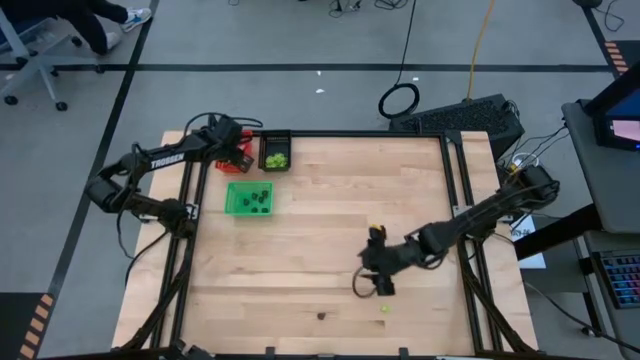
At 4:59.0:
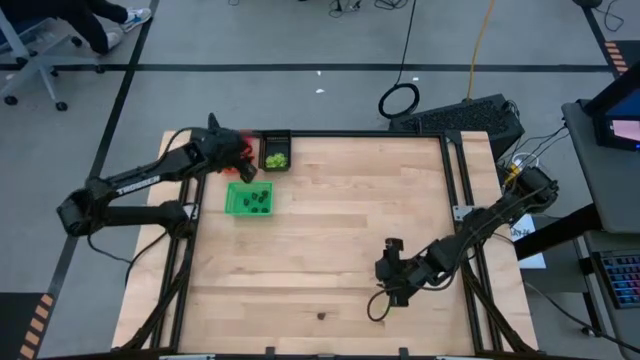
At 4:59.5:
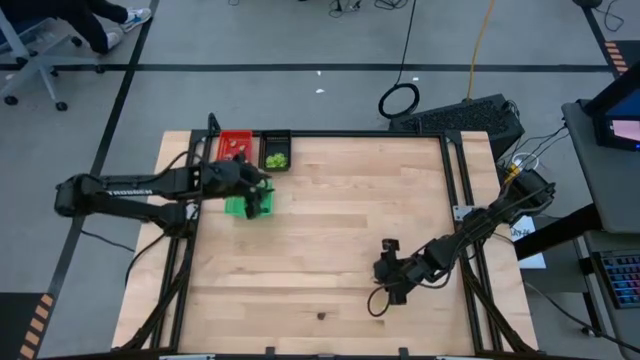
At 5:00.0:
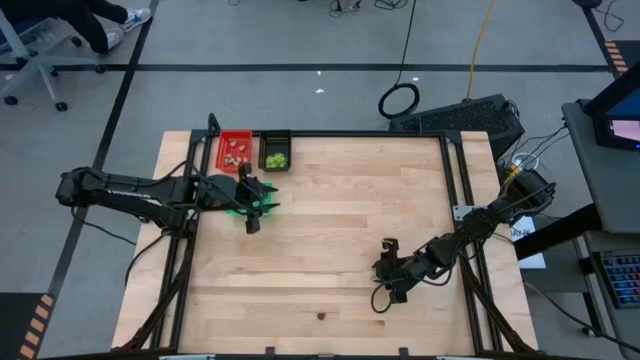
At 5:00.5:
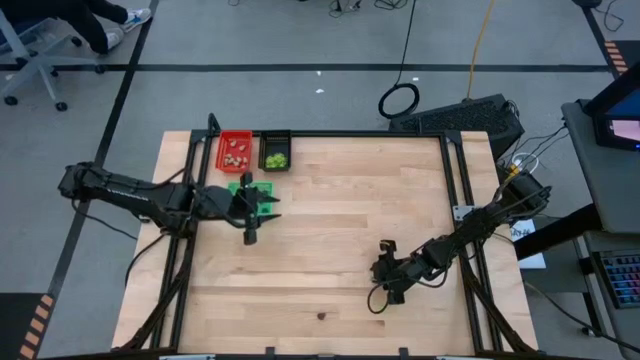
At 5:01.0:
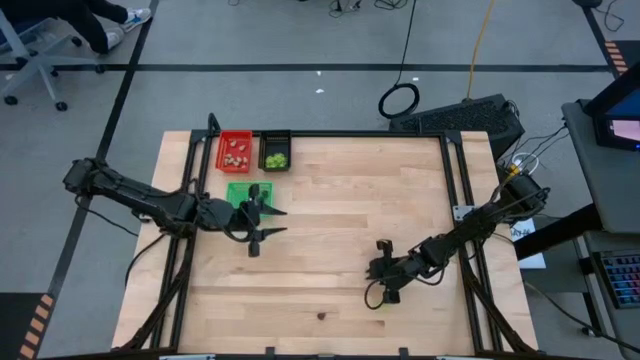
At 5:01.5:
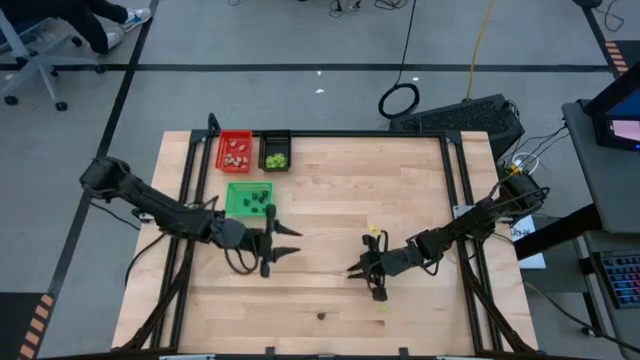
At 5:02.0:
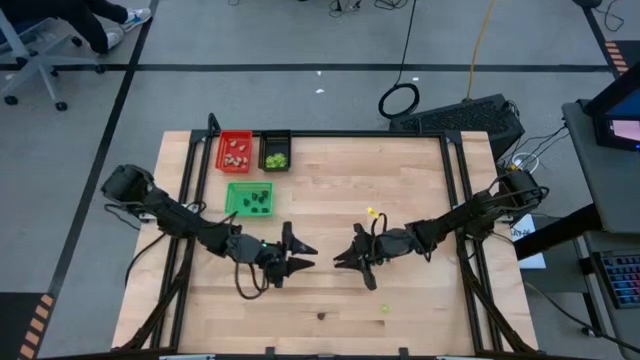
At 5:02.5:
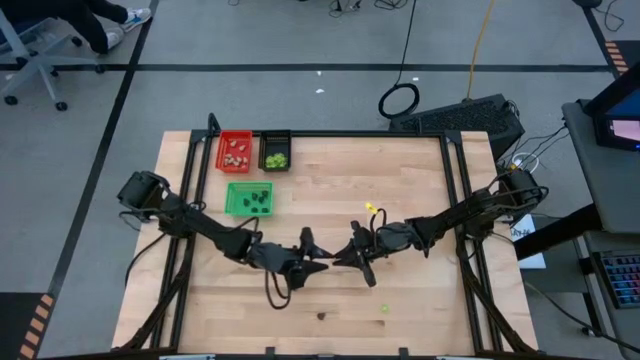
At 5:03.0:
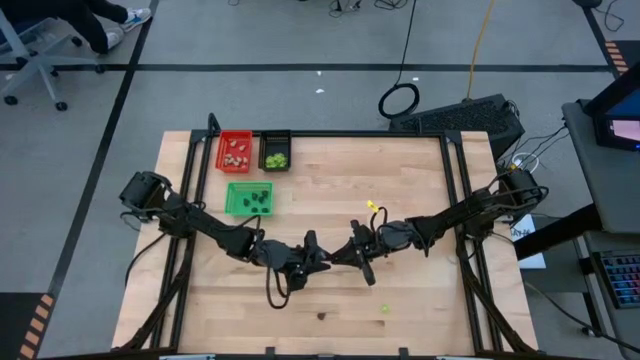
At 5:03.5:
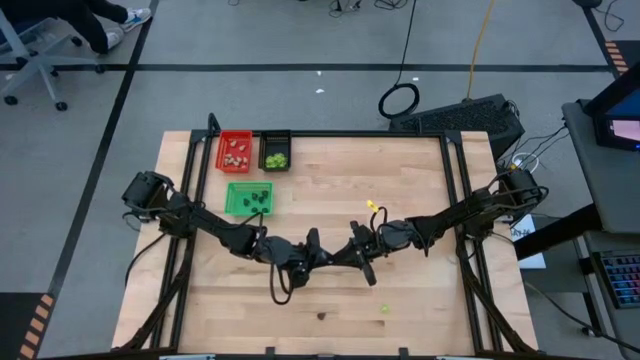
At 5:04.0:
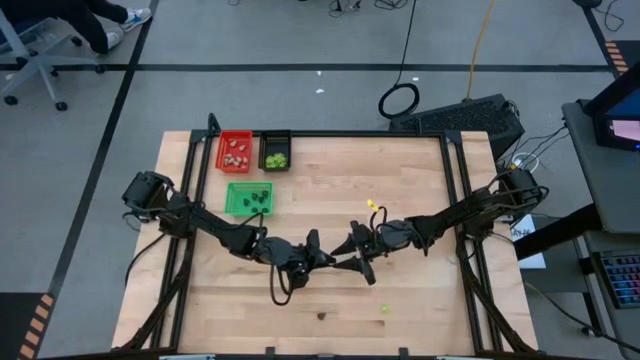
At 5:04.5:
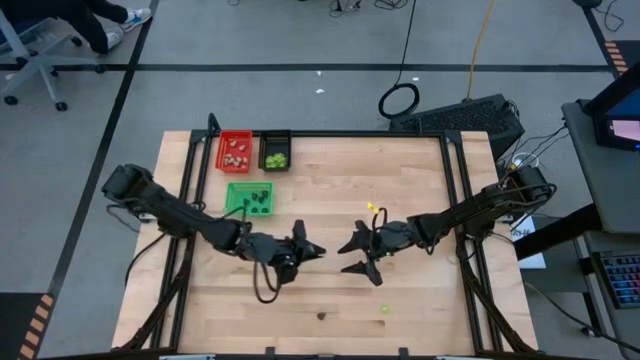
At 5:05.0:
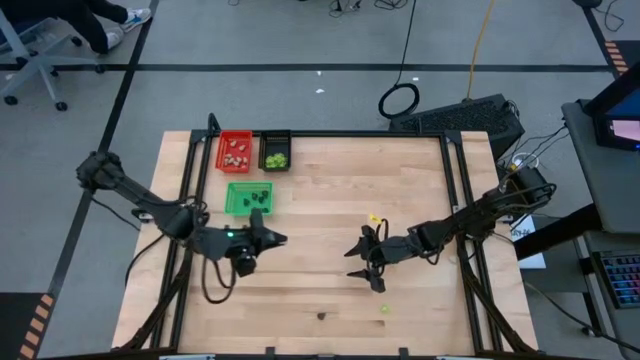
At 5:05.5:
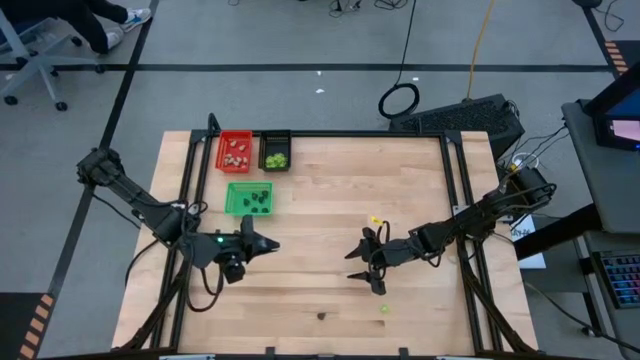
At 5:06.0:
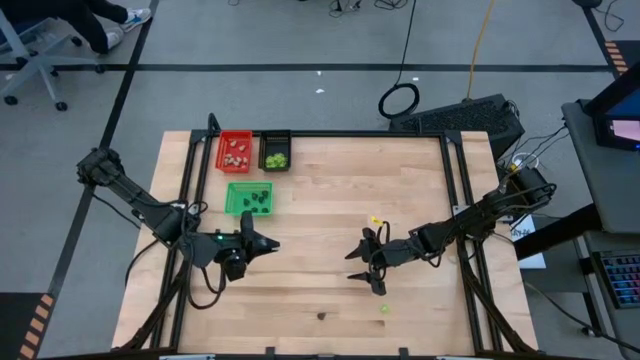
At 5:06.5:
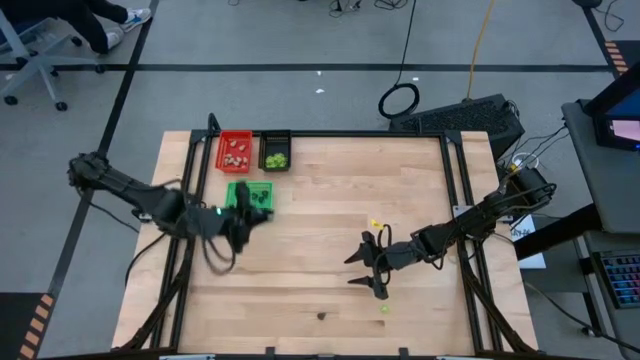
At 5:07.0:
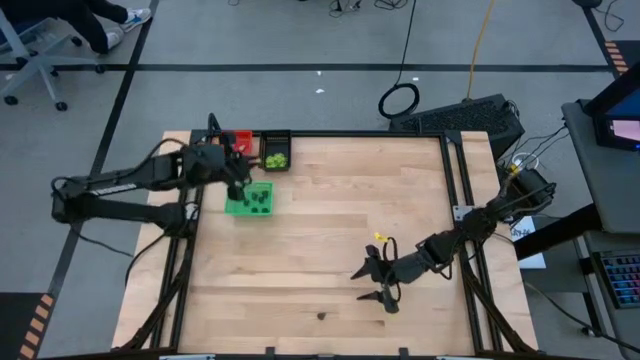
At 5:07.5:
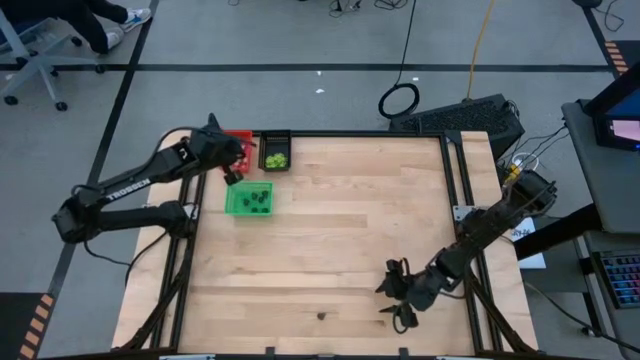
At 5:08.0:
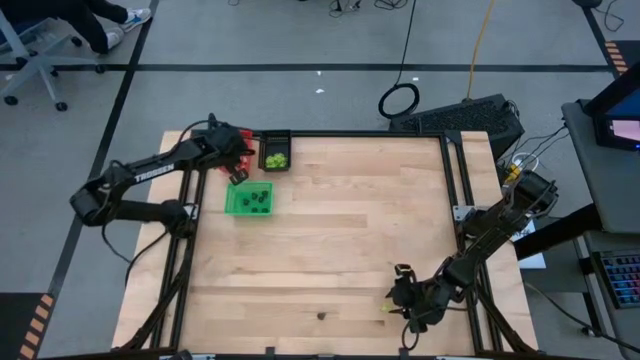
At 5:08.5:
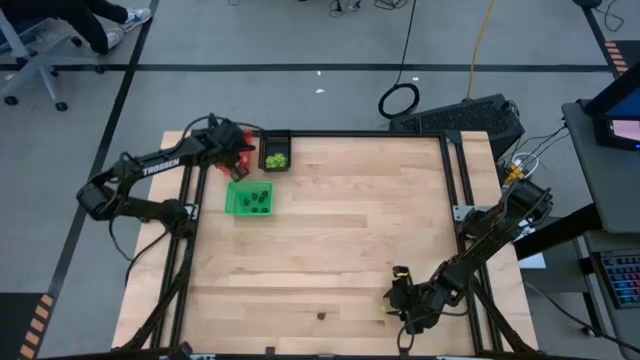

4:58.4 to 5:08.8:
Task: Sort Halloween decoration
Put the white skull toy into the red bin

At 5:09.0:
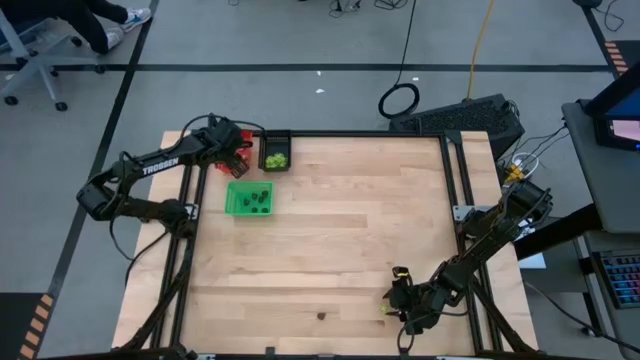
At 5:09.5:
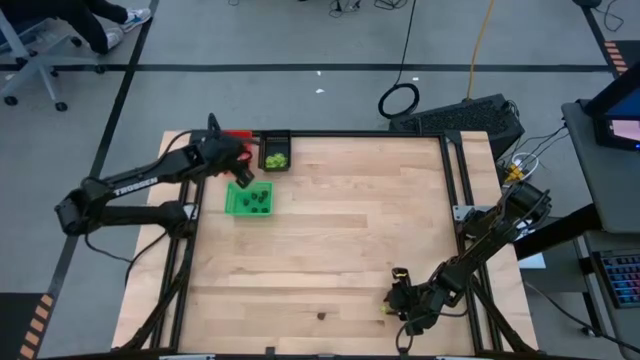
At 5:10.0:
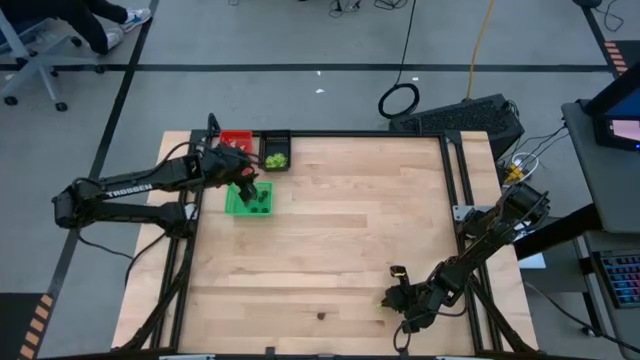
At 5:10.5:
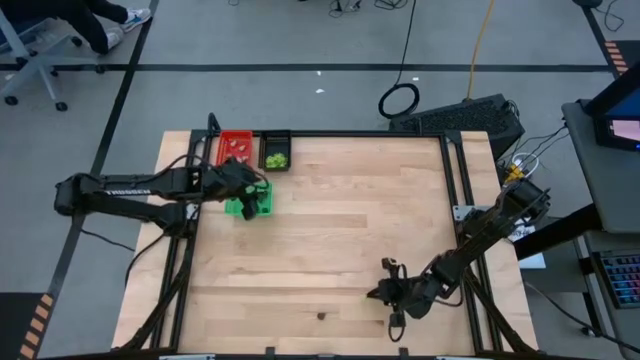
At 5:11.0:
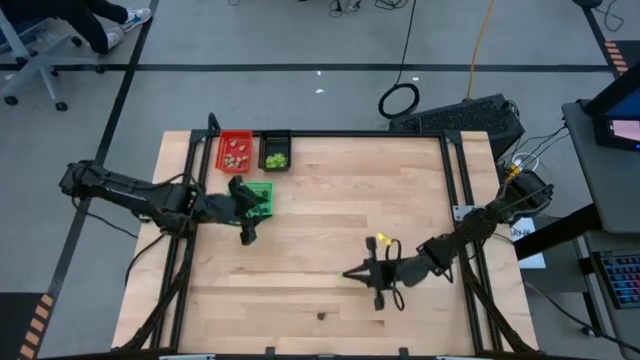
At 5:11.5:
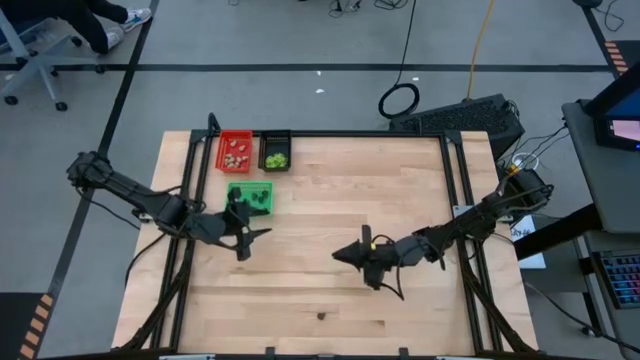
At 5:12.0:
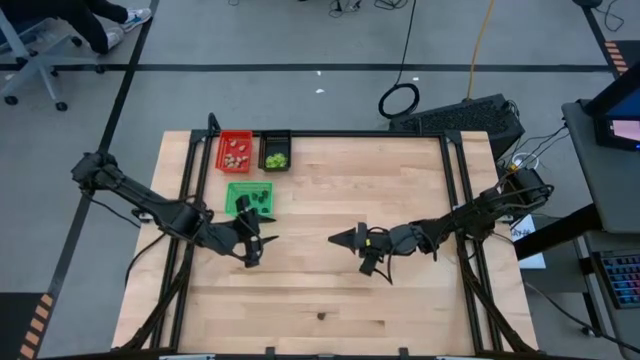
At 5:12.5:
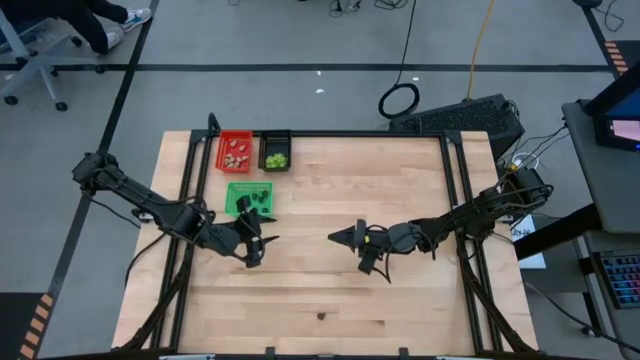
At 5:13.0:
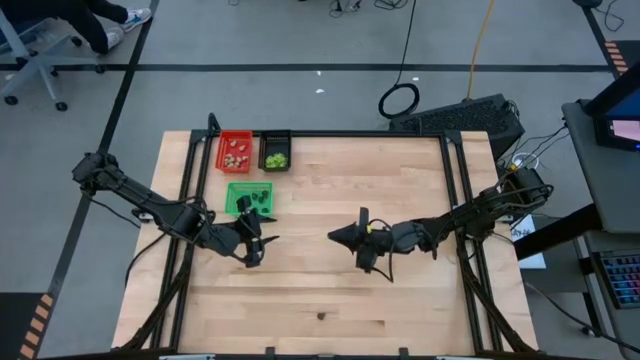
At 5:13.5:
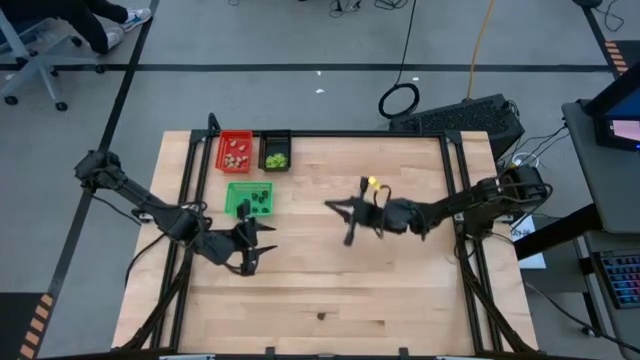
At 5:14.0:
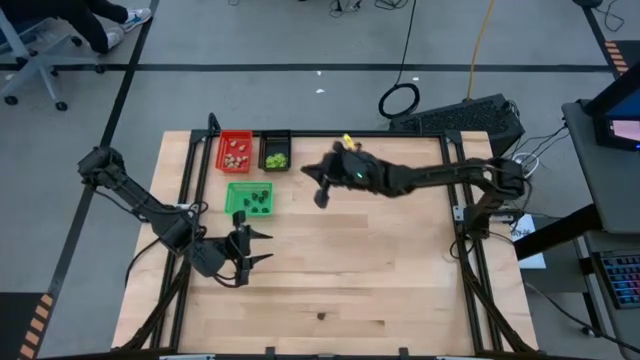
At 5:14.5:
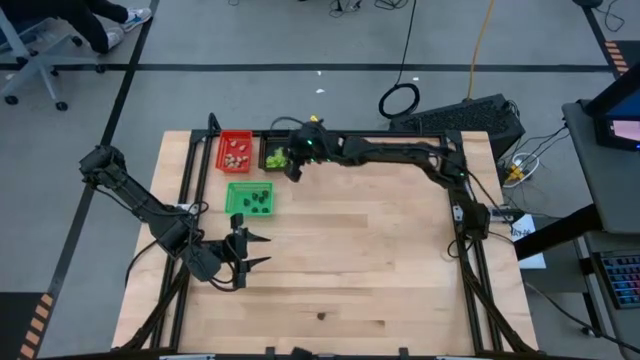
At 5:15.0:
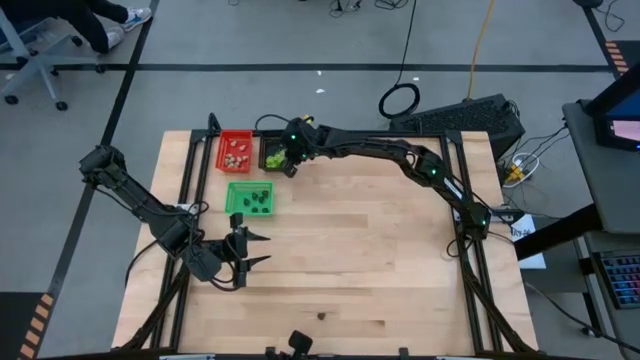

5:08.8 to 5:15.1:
Put the green spider toy into the black bin

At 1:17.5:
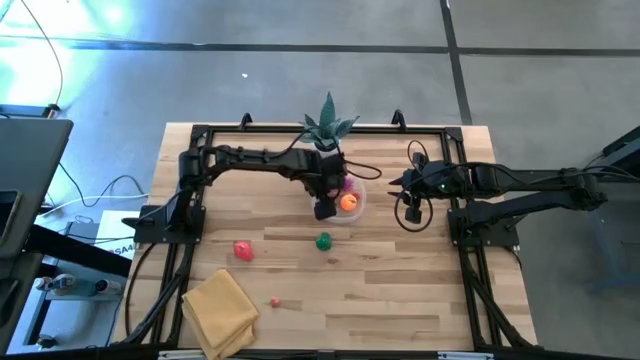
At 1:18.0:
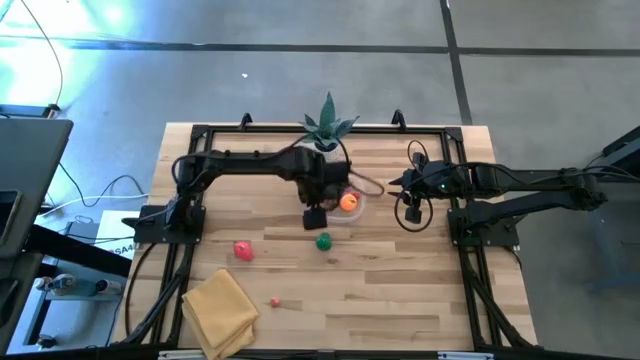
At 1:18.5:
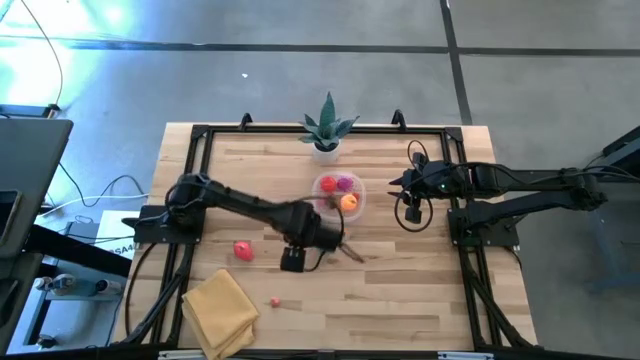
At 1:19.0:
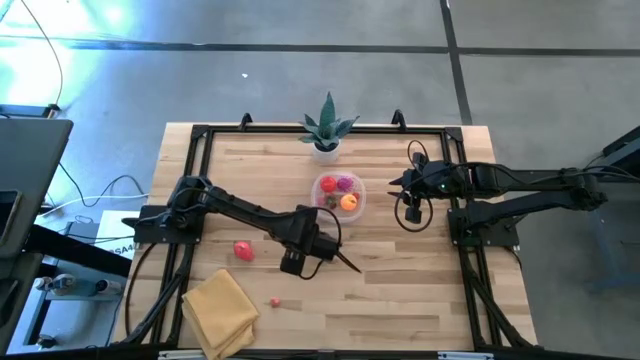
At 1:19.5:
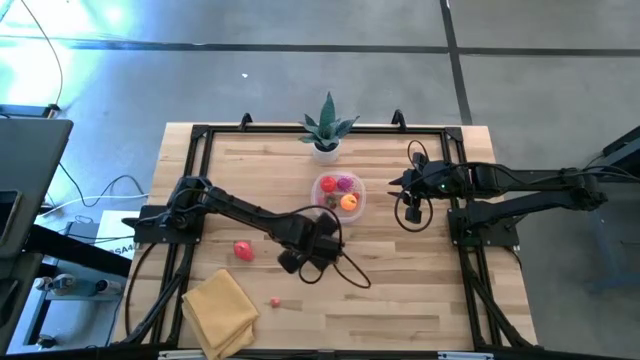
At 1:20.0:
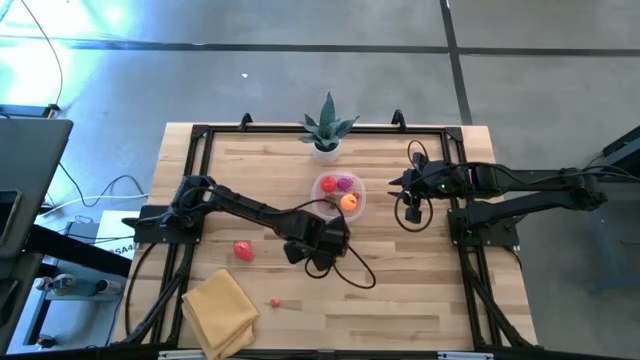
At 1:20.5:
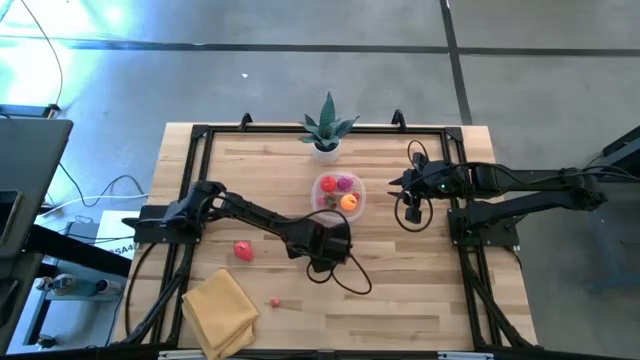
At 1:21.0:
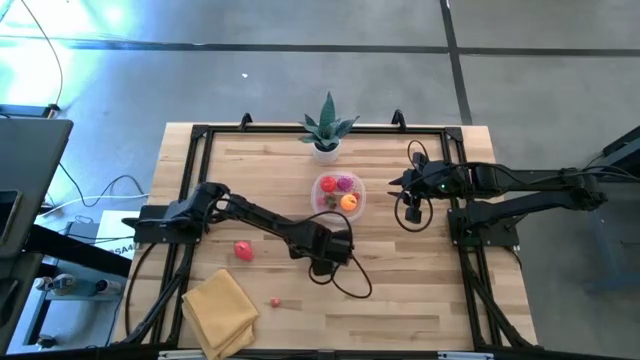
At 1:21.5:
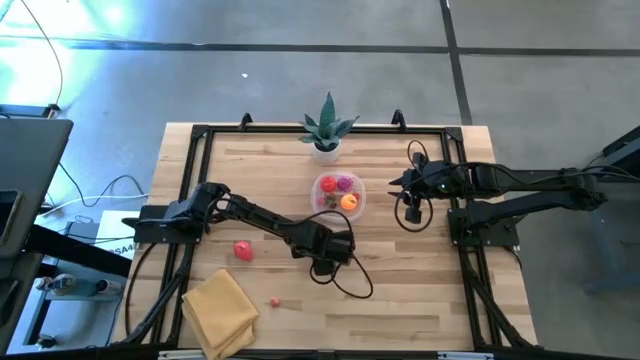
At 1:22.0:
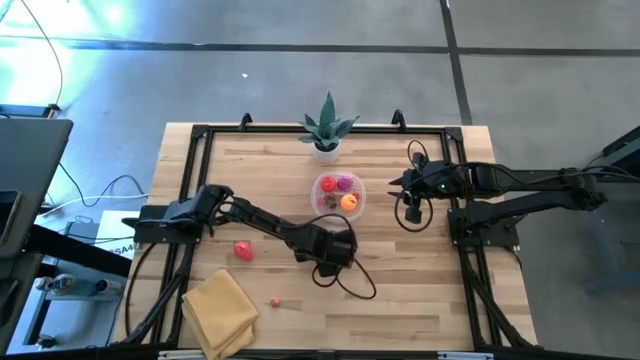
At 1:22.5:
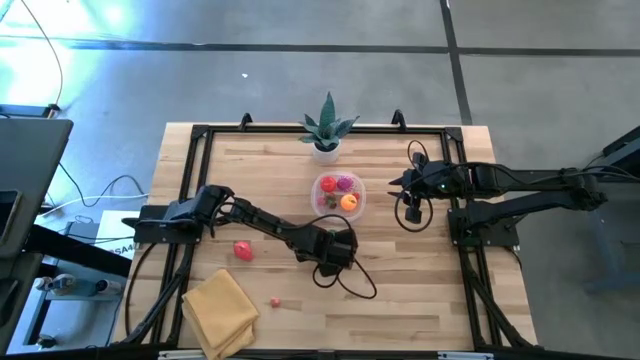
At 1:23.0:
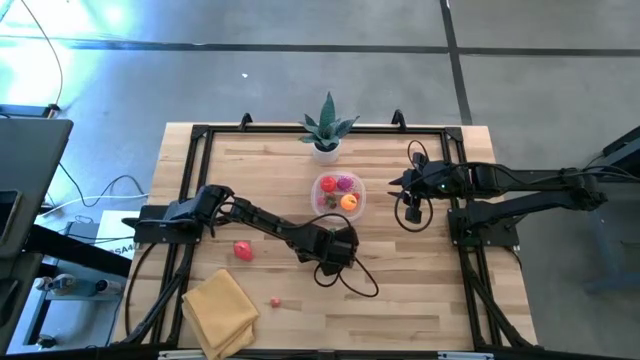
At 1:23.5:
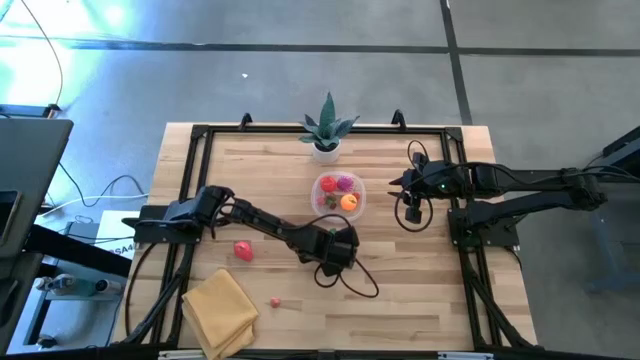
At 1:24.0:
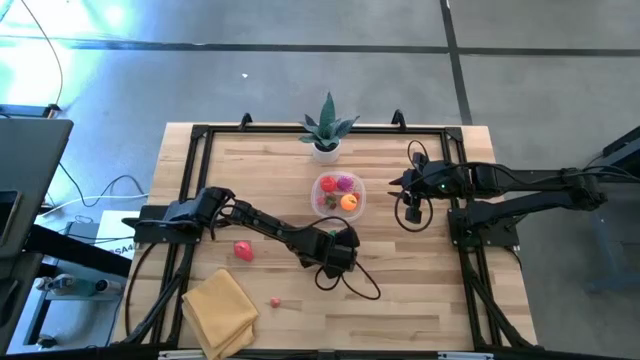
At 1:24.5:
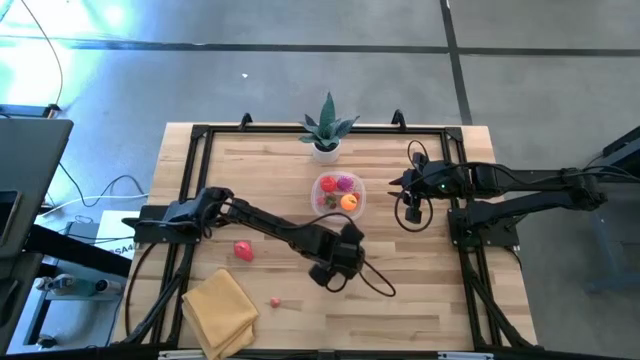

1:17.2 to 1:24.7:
Task: Pick and placing Produce into tupperware
Put the green bell pepper into the transparent container
